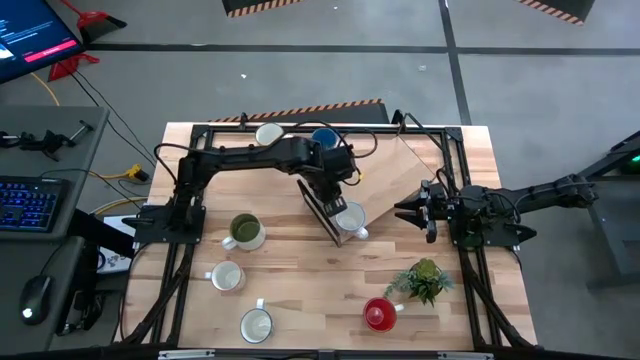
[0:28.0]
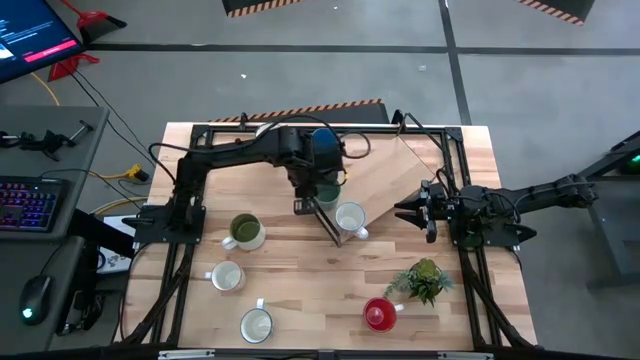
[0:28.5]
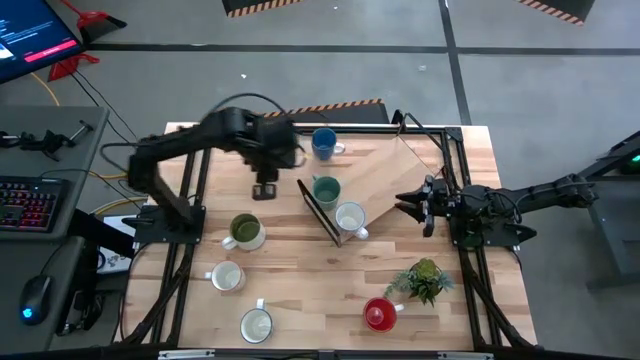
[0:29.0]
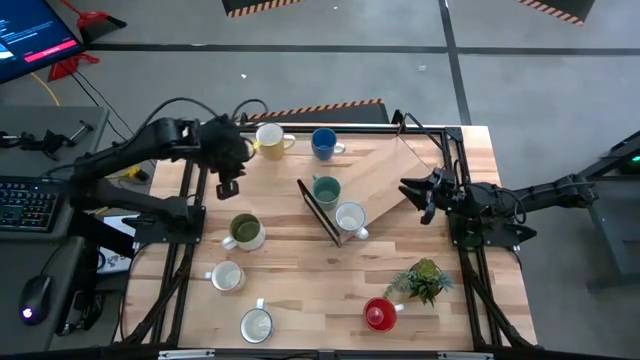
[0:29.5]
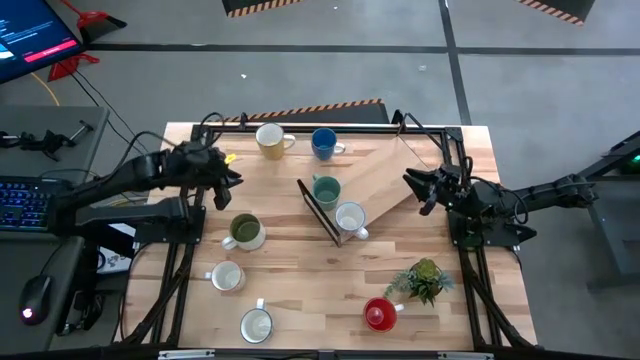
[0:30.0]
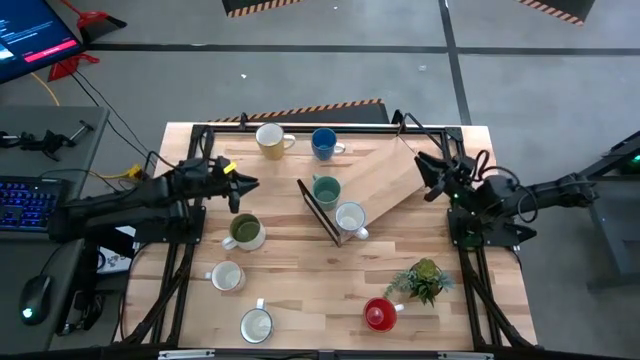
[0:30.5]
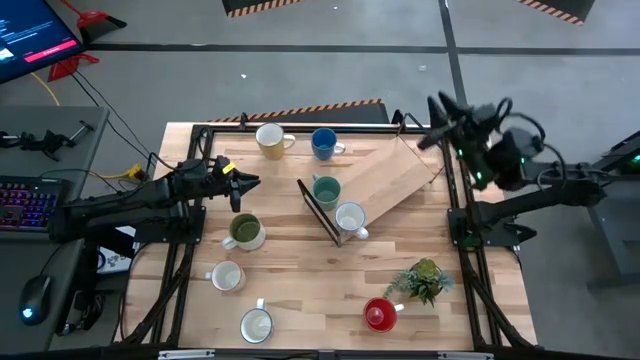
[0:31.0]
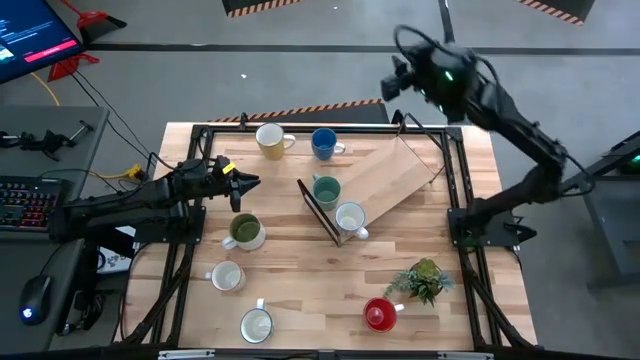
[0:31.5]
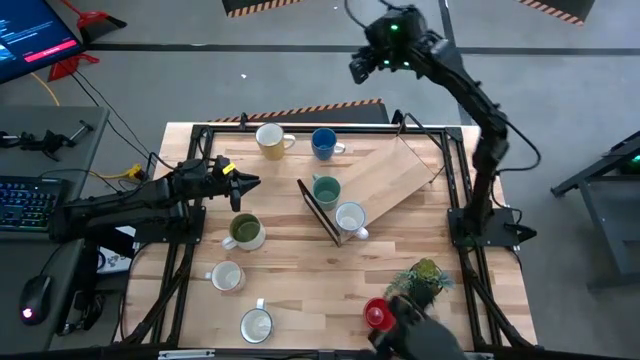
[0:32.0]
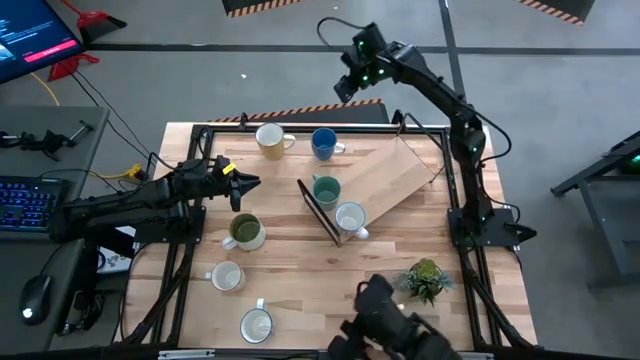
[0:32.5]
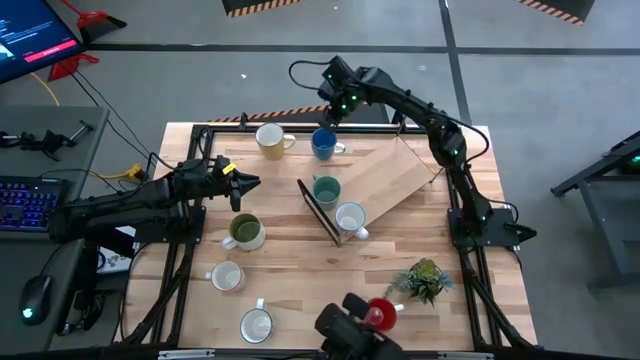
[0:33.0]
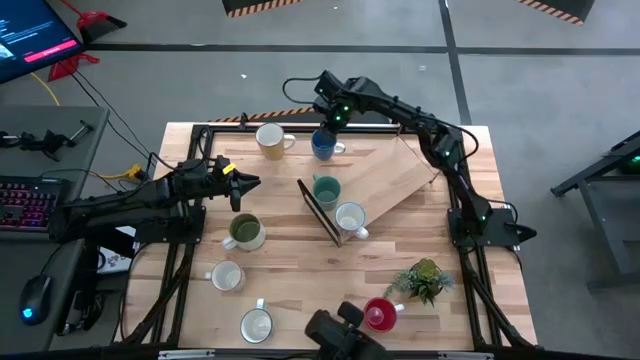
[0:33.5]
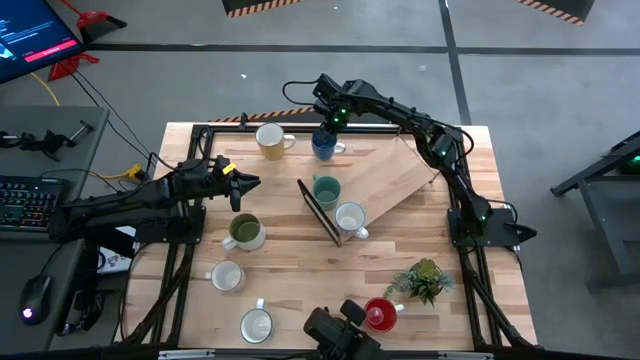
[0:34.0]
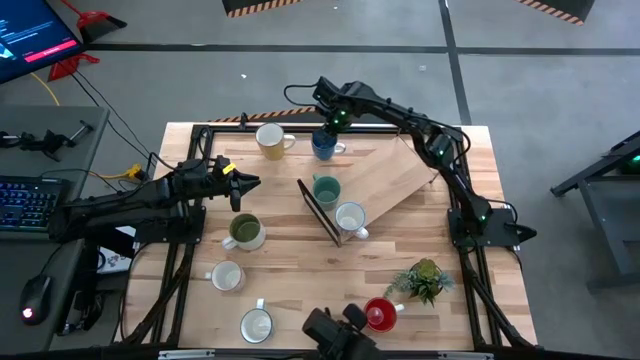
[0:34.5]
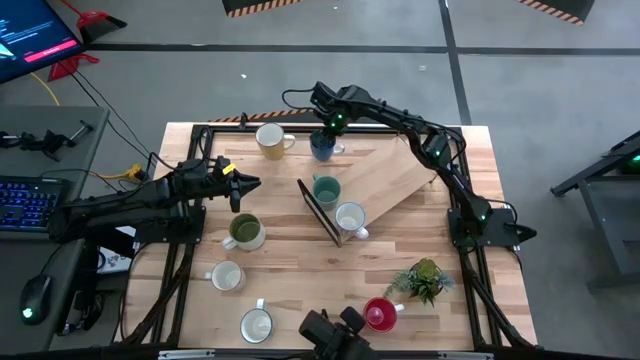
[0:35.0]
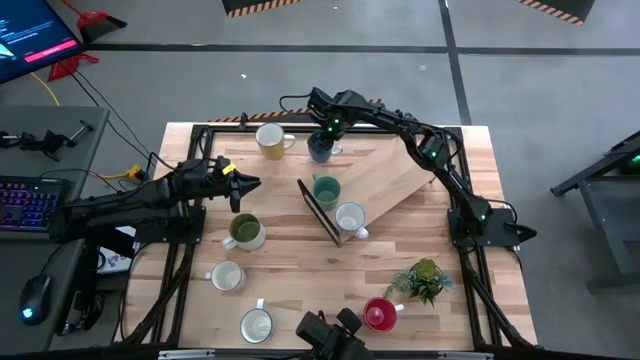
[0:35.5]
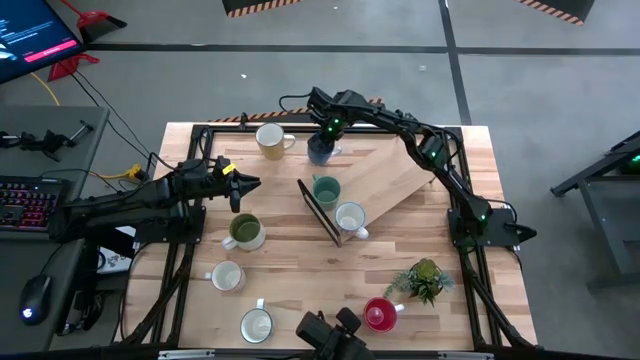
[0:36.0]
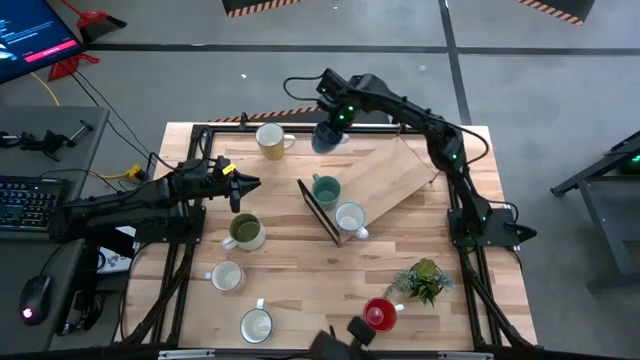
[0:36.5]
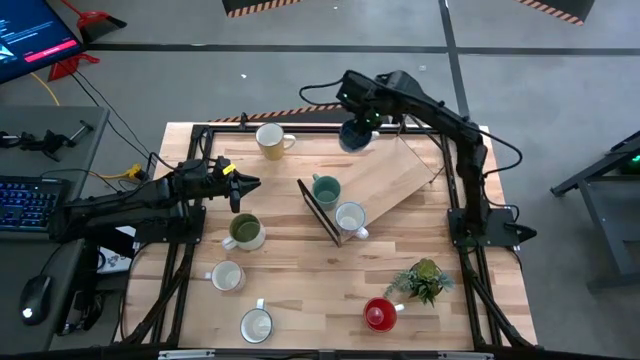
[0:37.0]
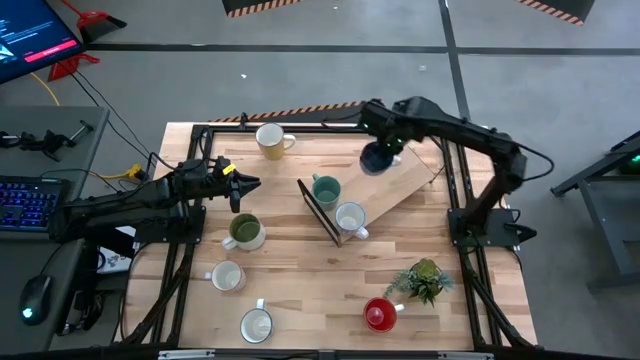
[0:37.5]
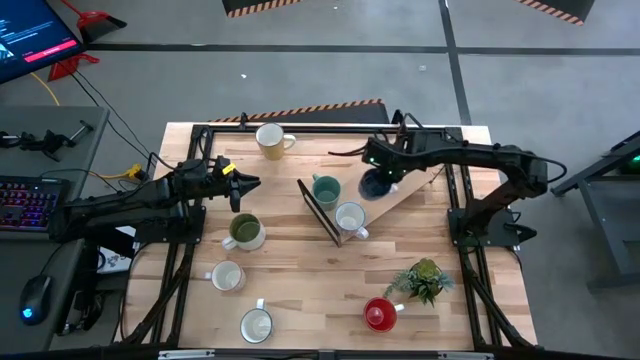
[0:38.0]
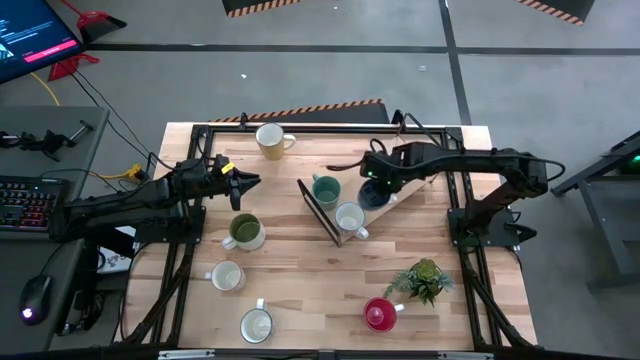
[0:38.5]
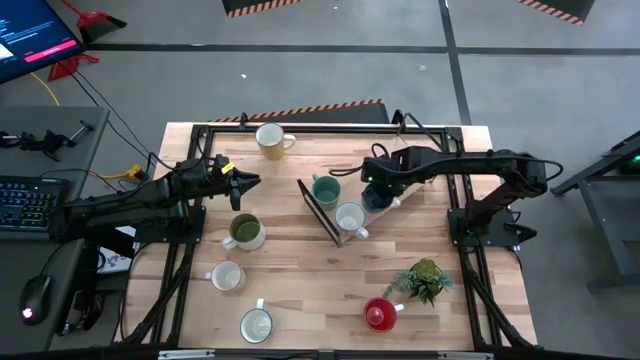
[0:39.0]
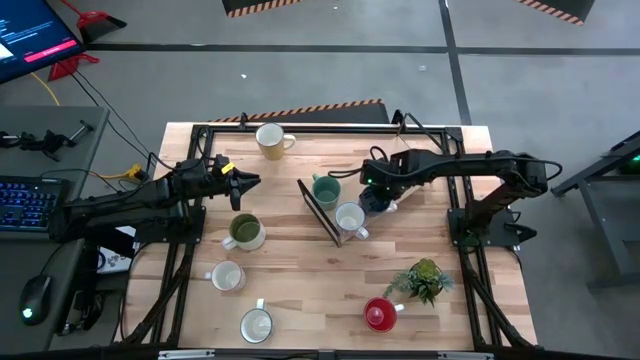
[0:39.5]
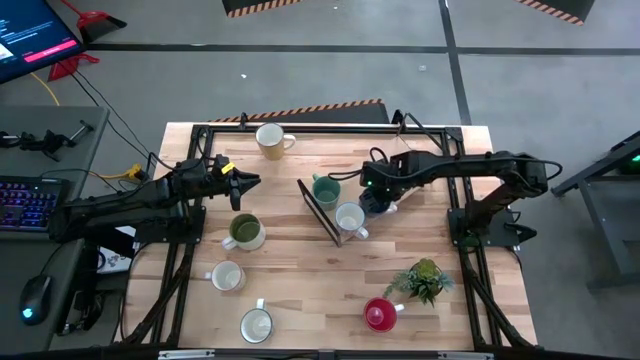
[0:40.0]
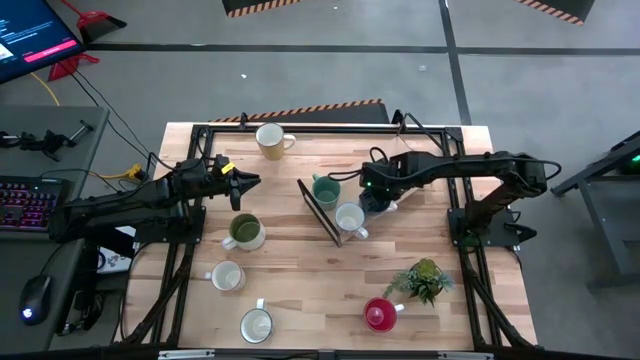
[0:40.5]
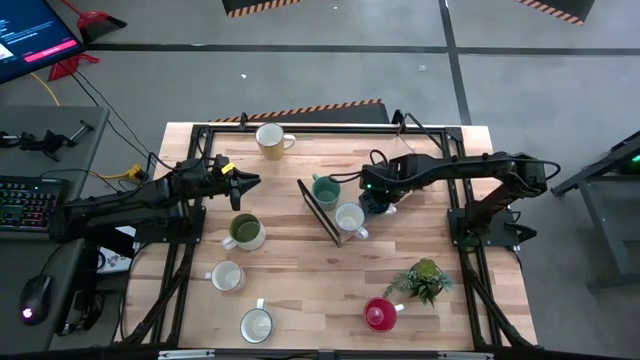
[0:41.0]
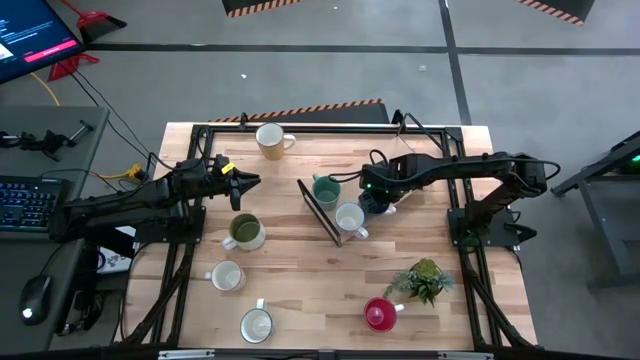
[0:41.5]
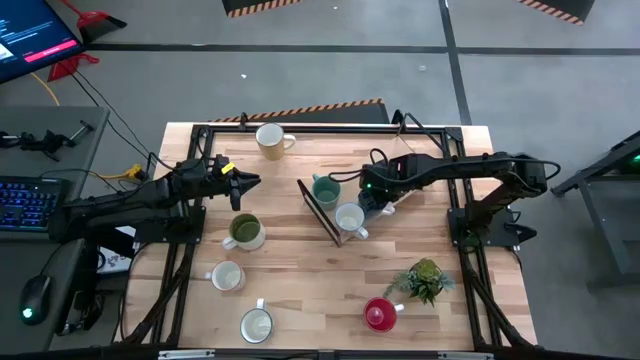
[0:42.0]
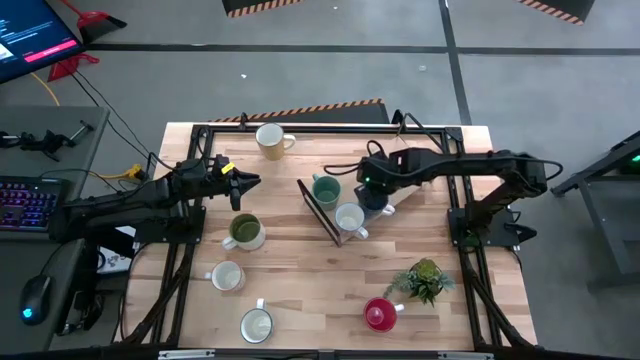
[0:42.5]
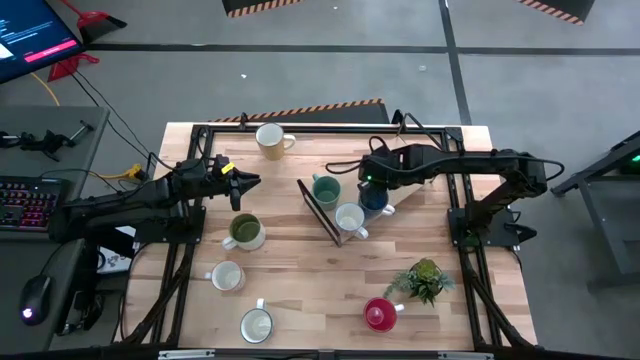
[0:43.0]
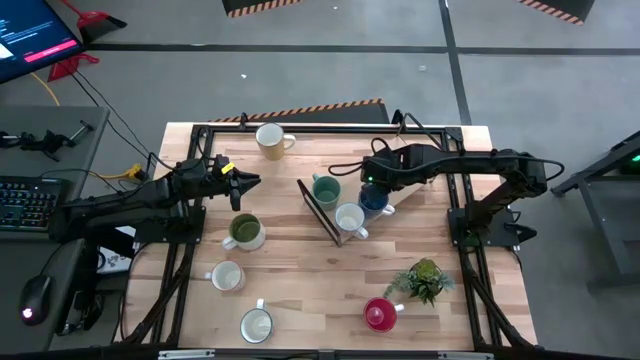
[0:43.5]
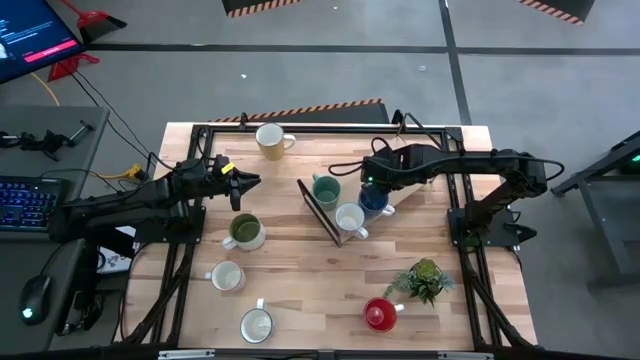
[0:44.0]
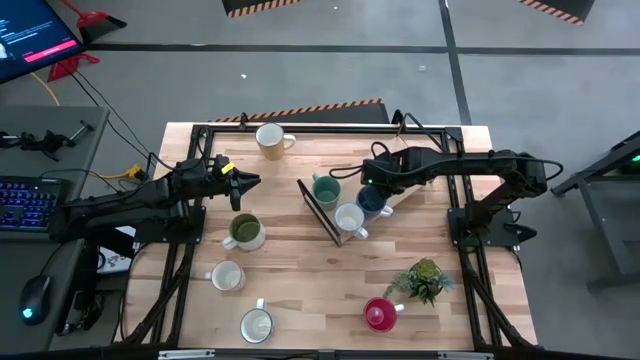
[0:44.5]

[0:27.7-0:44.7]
Task: Place coffee mugs
Put the blue mug on the shelf

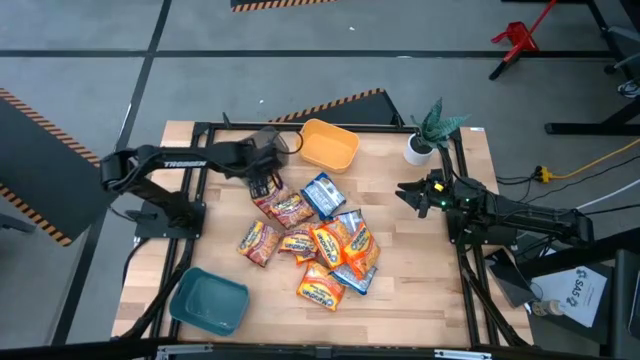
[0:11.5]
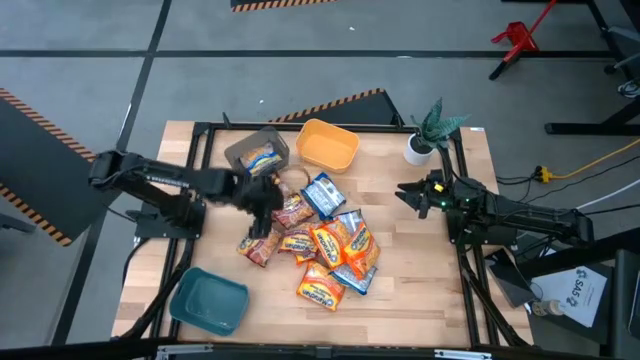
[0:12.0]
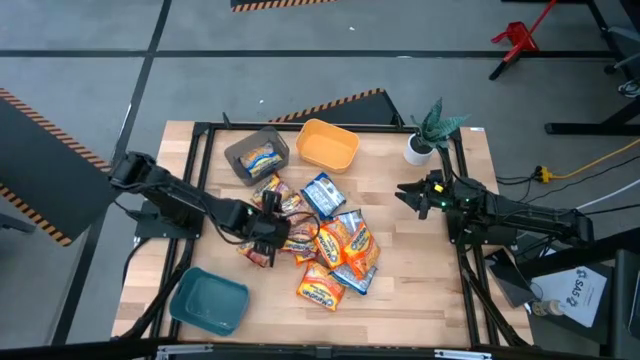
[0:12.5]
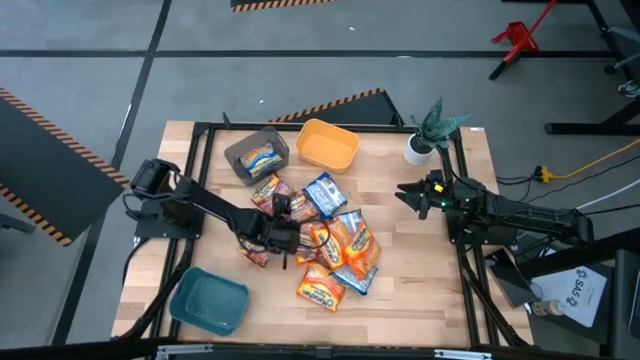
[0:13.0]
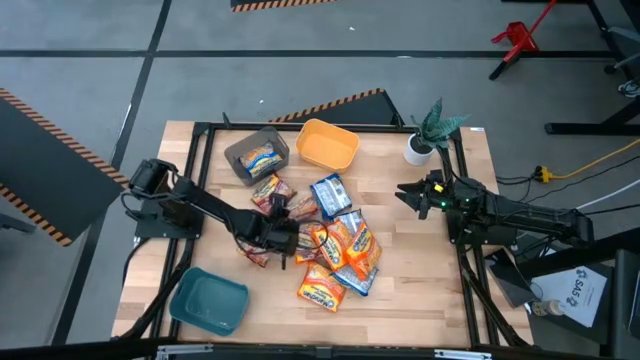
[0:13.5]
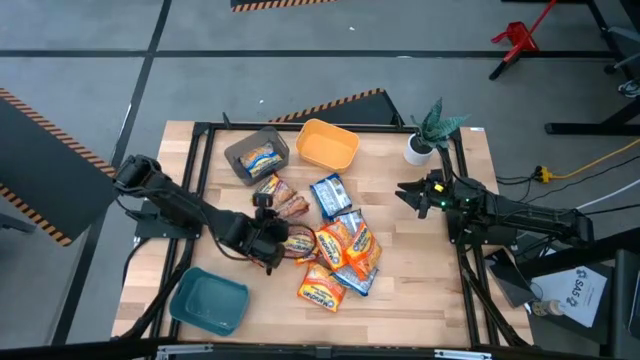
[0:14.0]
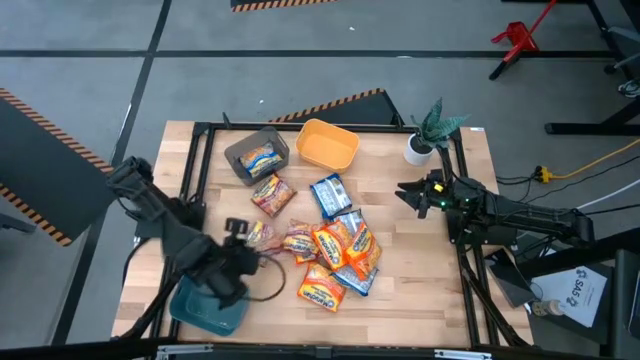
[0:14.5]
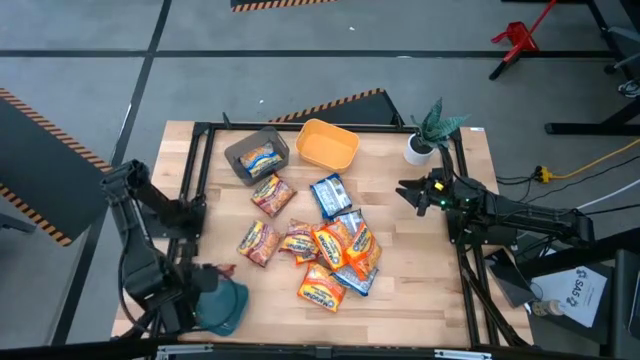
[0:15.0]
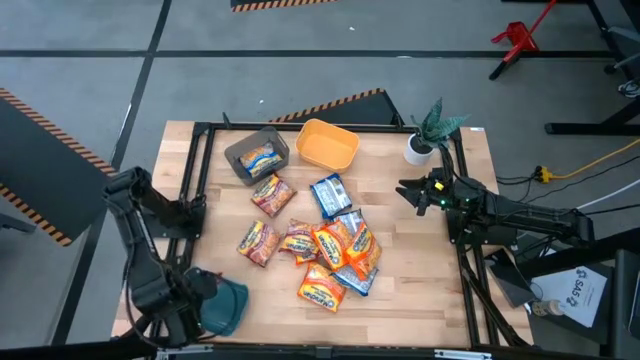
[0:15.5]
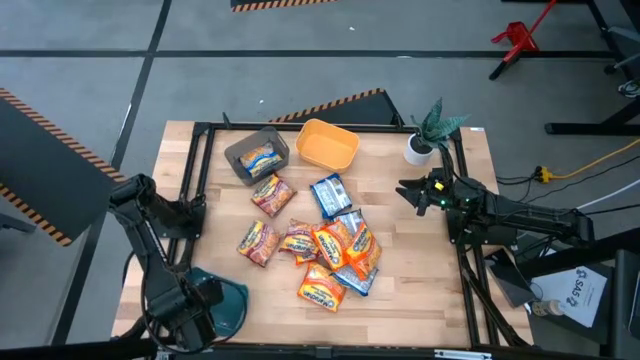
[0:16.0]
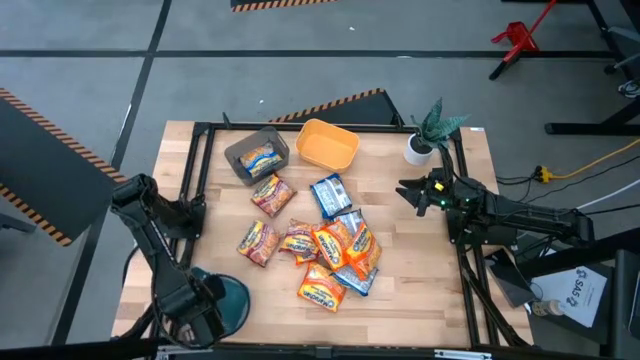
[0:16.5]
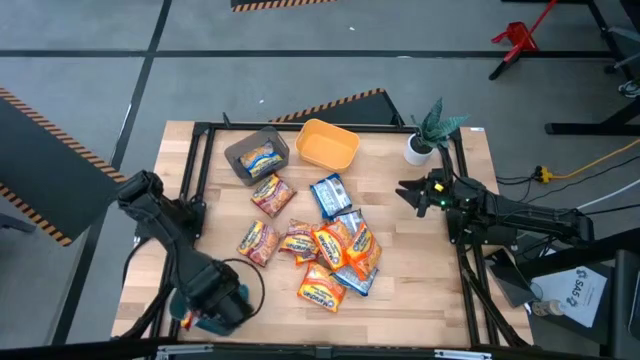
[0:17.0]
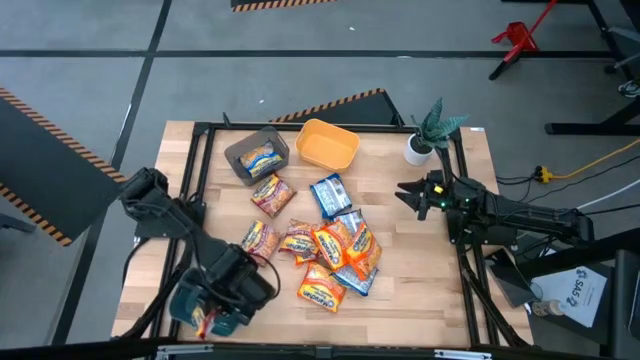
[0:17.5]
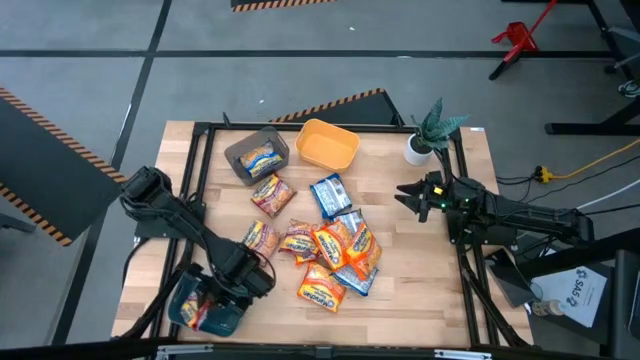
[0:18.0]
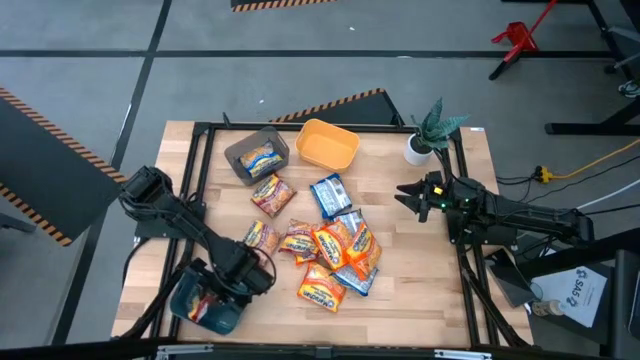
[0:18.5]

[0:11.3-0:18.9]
Task: Sort Maruchan noodles
Put the pack of red ramen noodle soup into the teal blue bin
